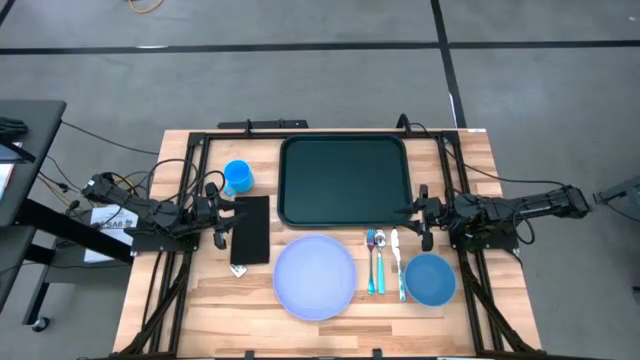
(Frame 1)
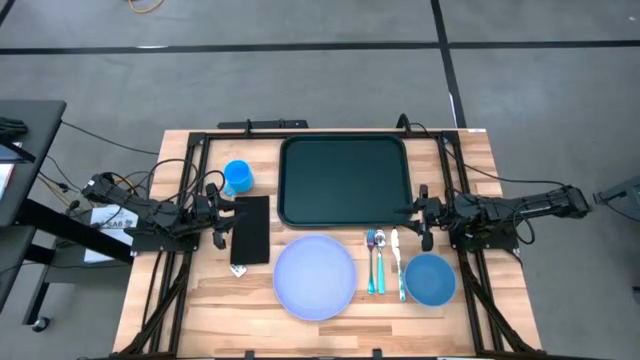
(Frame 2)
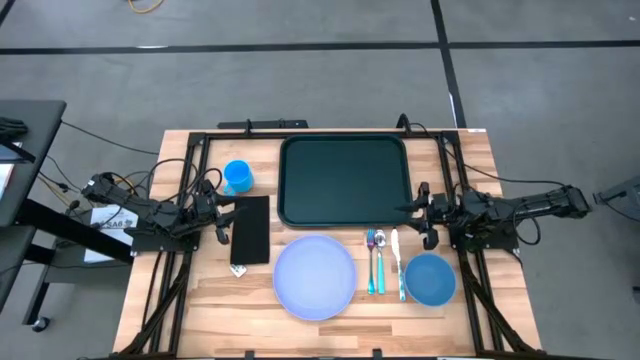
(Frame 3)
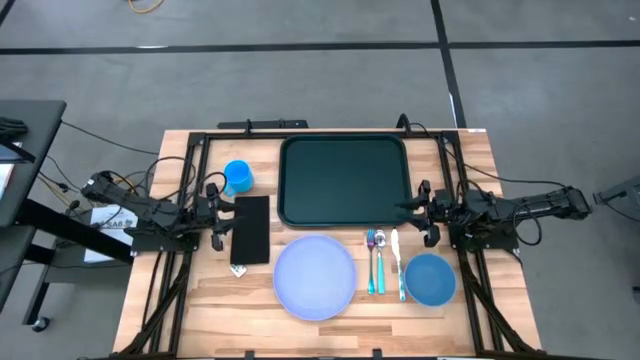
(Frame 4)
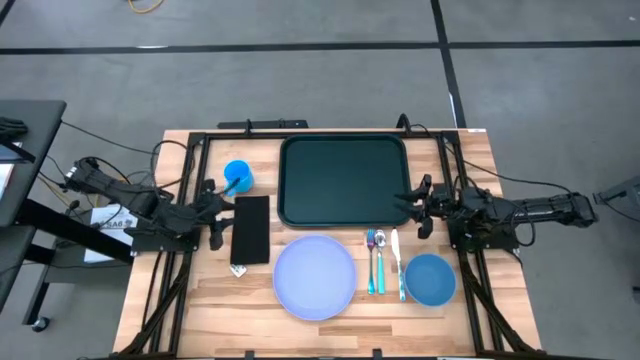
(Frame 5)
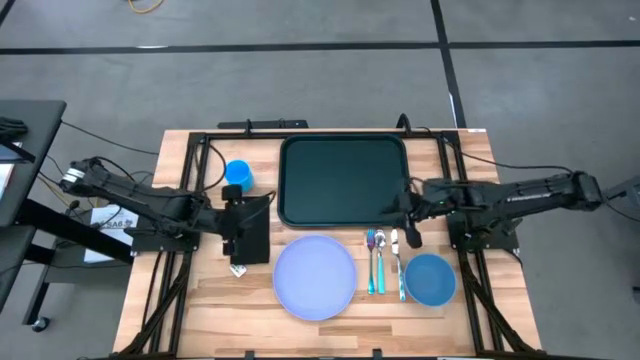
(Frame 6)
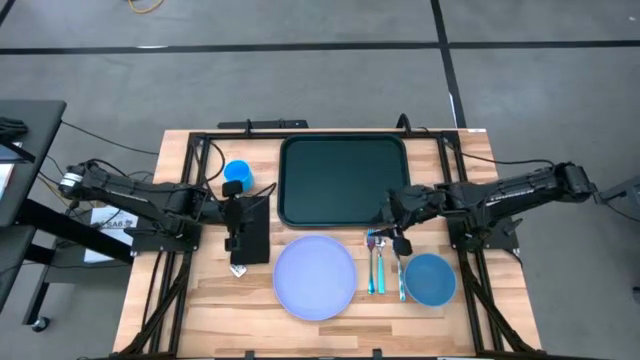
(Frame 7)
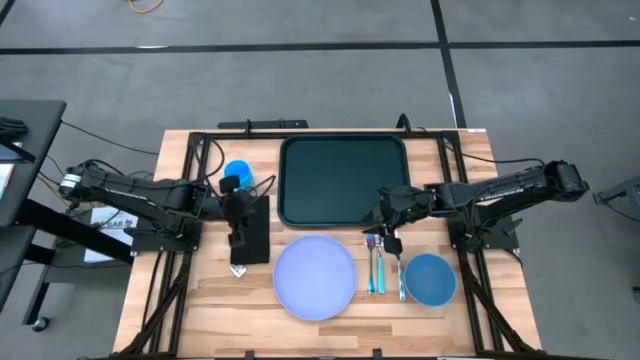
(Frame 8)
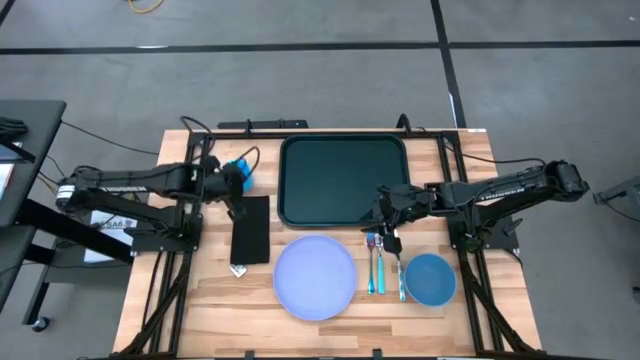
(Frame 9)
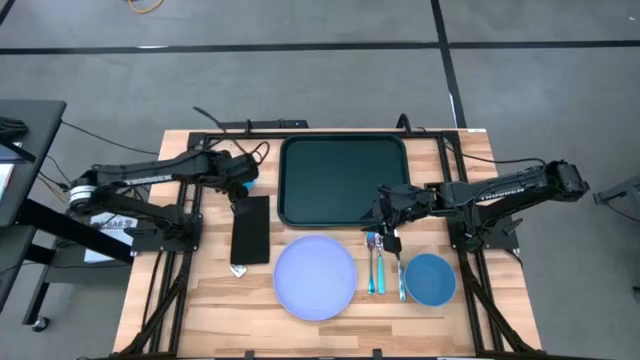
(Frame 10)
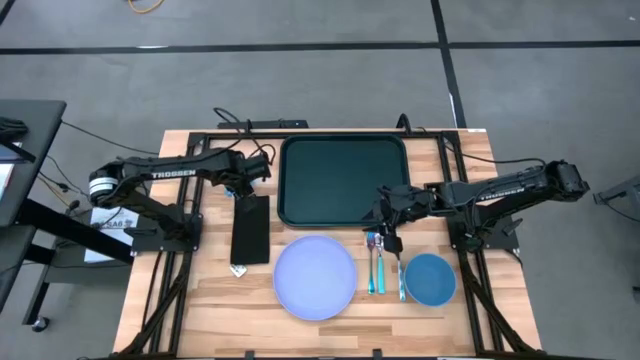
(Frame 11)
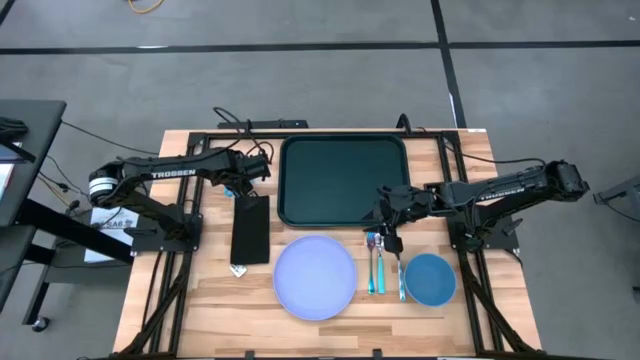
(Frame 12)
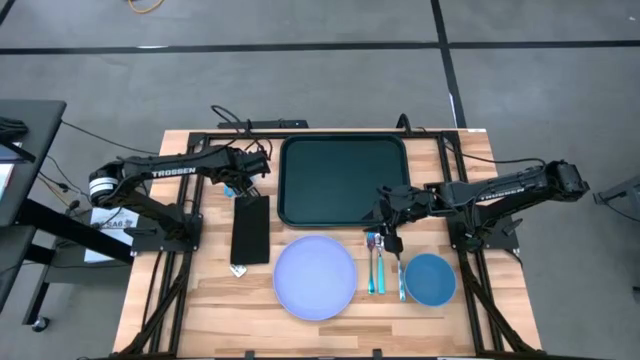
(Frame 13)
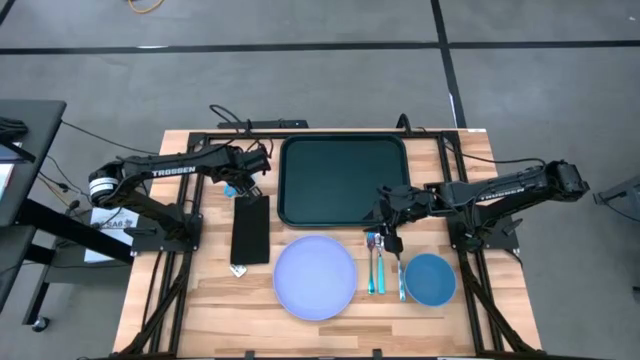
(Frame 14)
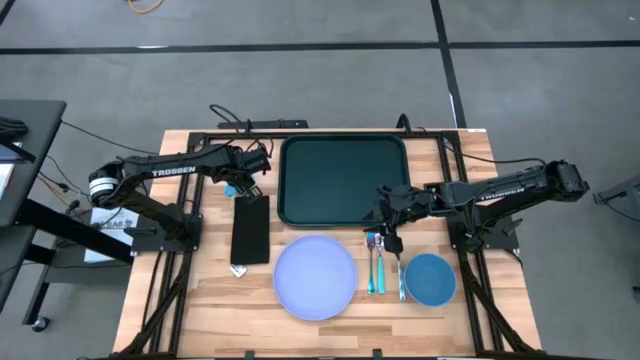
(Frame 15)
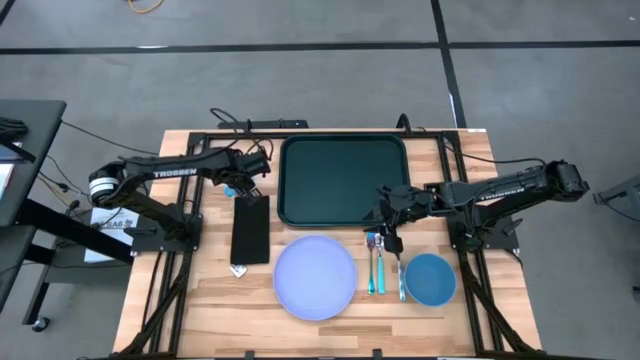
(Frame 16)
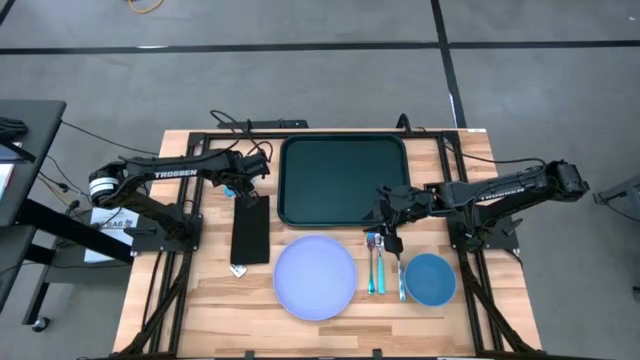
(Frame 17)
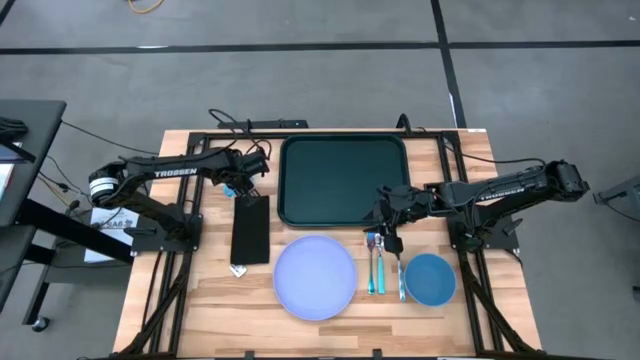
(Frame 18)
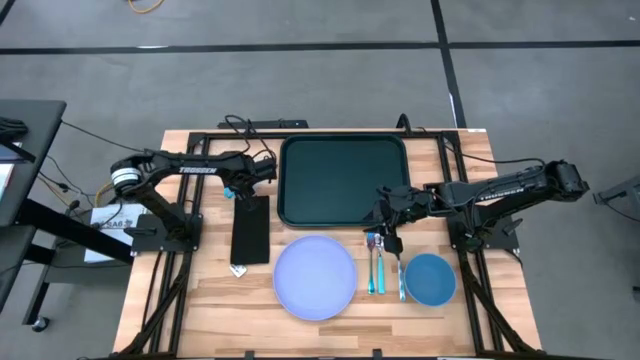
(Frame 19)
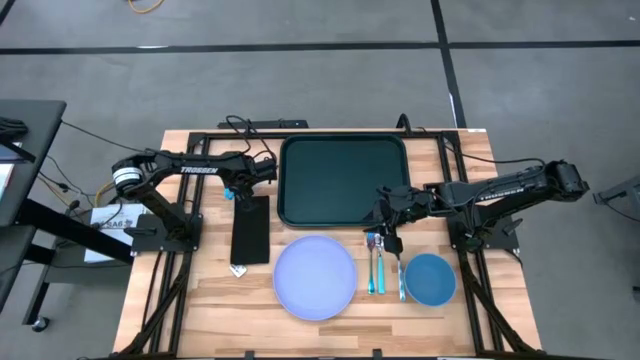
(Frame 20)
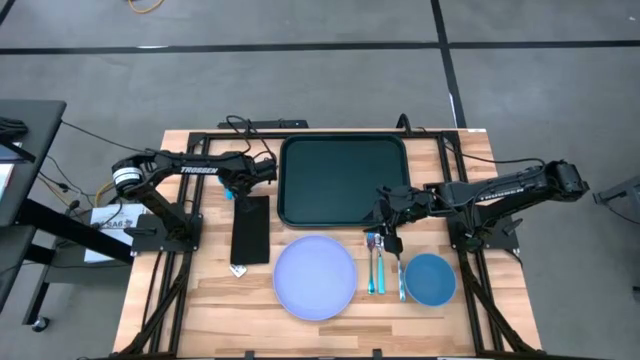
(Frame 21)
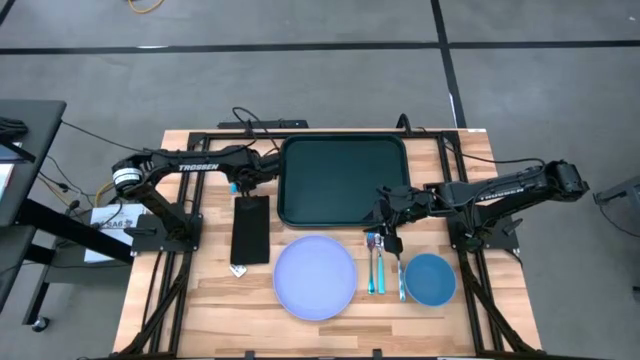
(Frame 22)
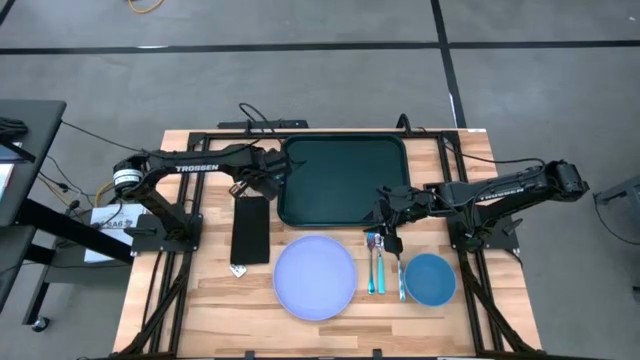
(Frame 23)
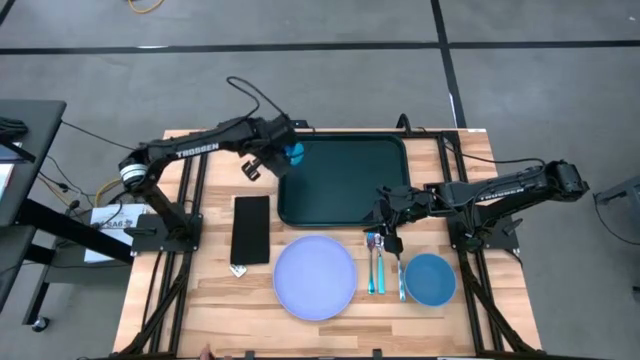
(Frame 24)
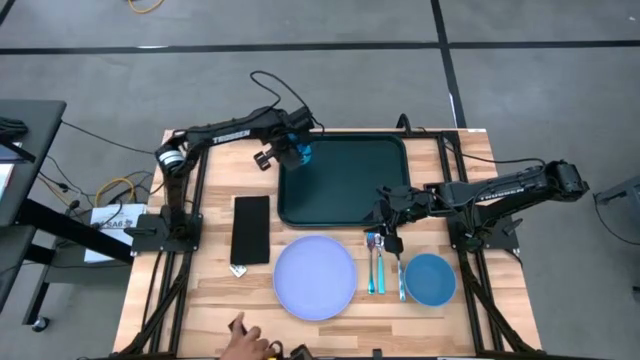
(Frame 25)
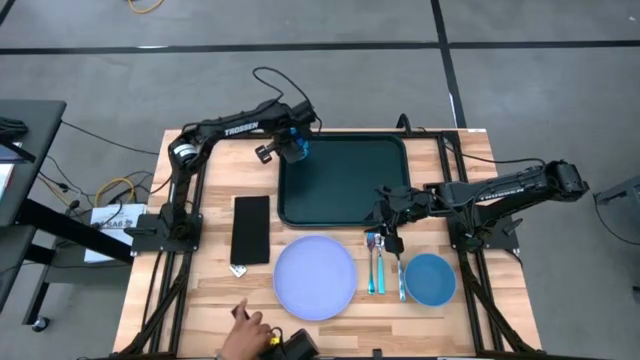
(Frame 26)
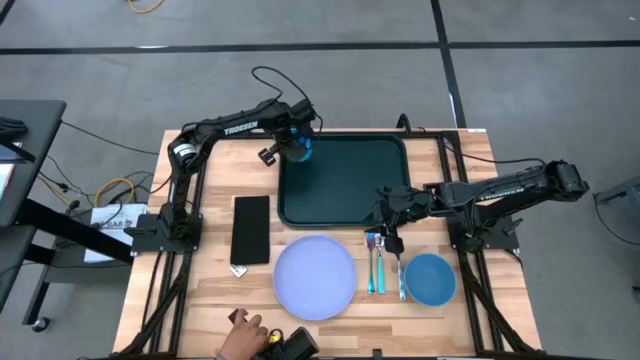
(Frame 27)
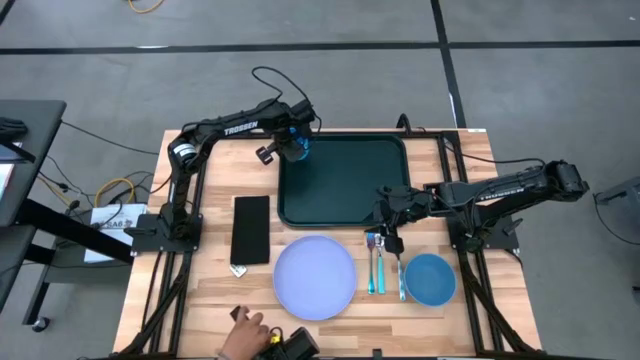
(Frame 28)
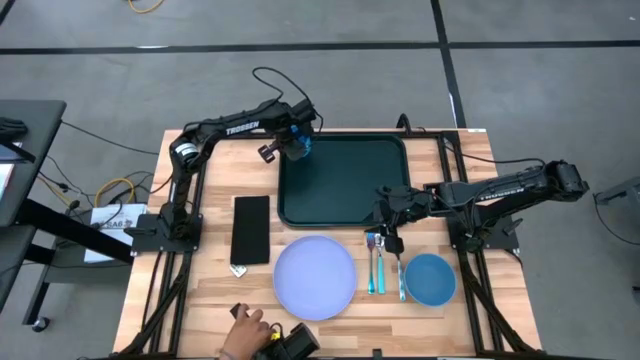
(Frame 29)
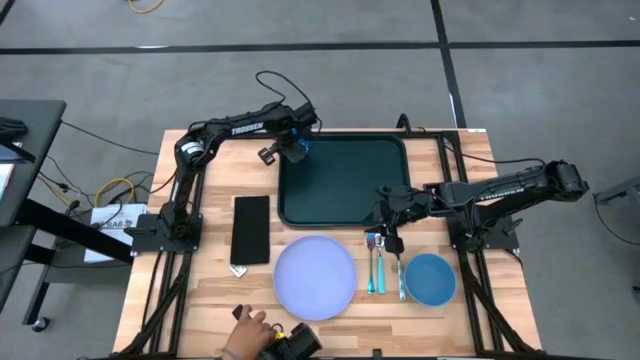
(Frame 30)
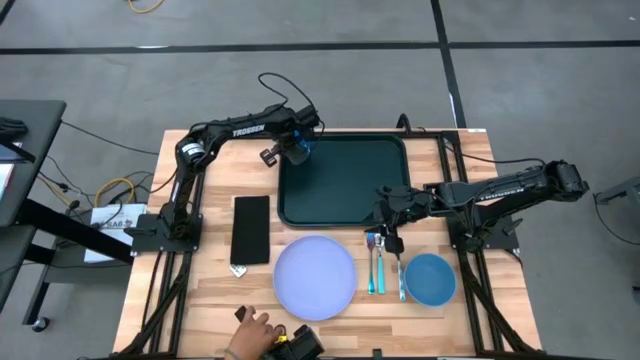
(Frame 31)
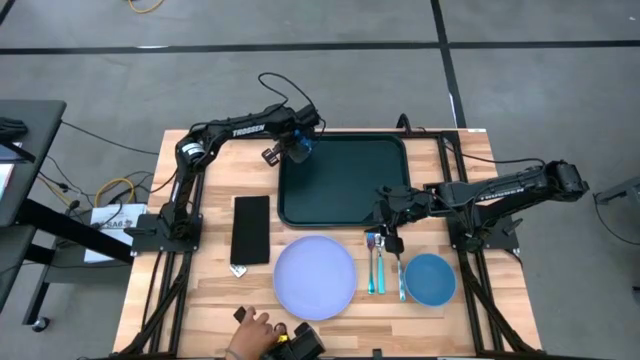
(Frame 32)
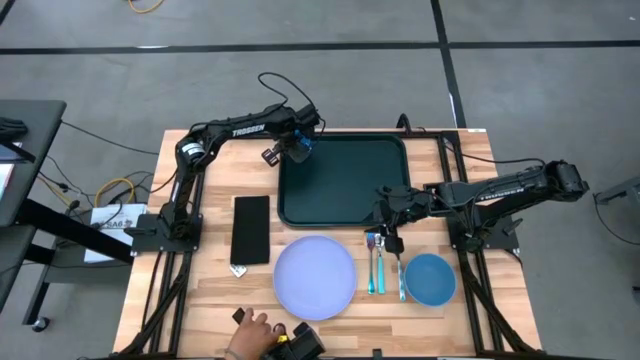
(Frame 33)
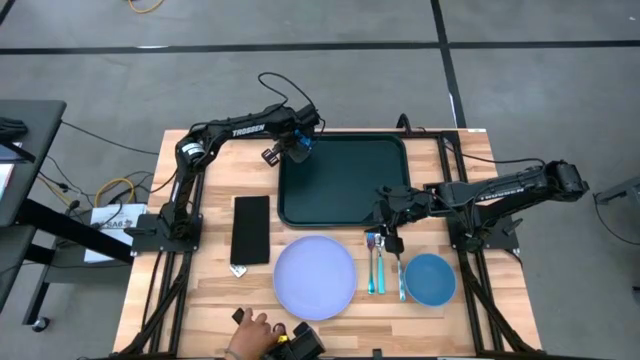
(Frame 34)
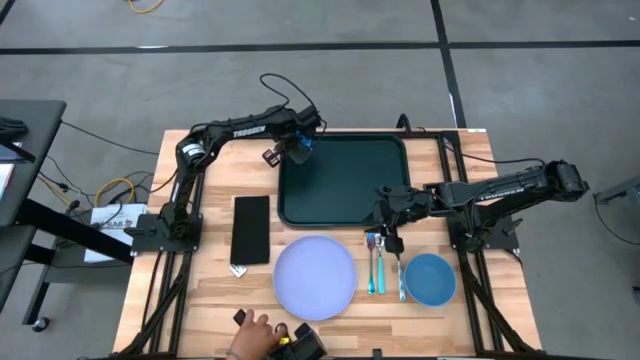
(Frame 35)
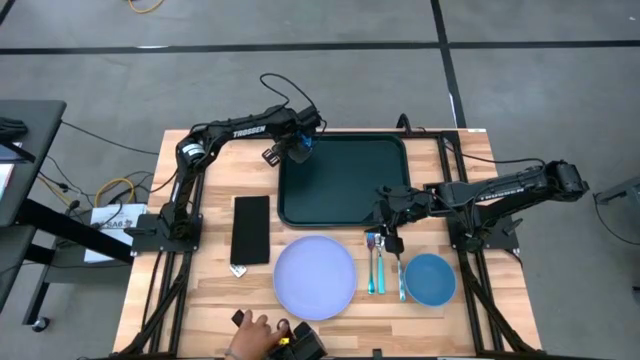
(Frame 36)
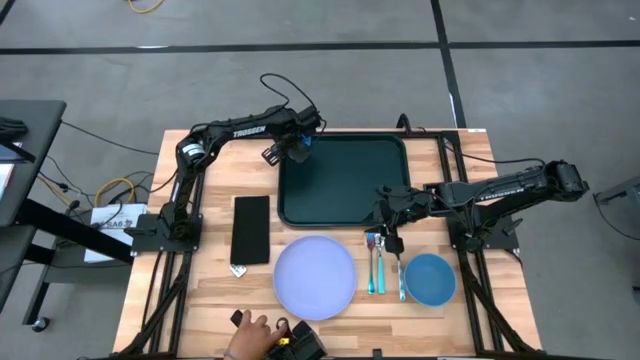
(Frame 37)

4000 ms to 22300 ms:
Task: Set up tray
Put the light blue cup on the black tray

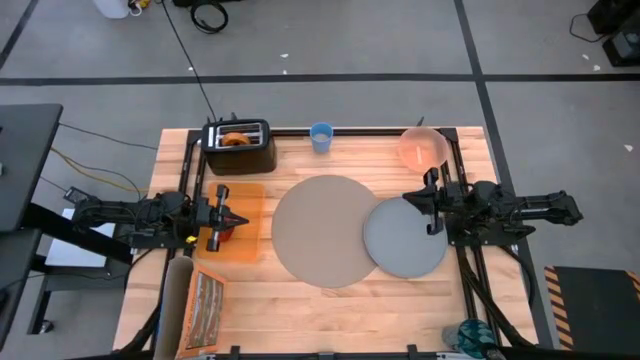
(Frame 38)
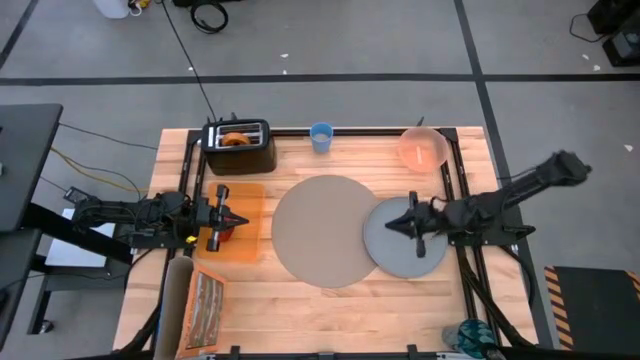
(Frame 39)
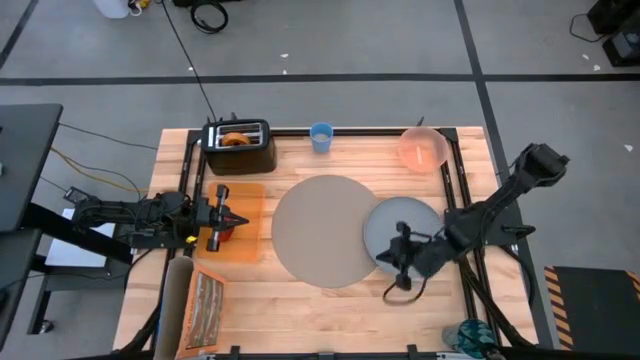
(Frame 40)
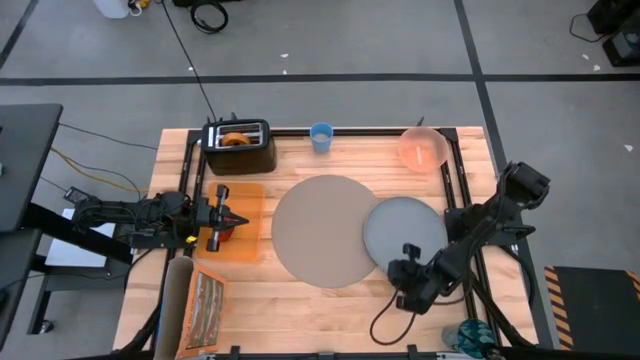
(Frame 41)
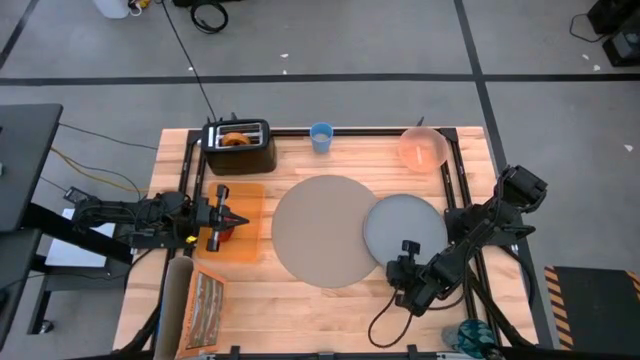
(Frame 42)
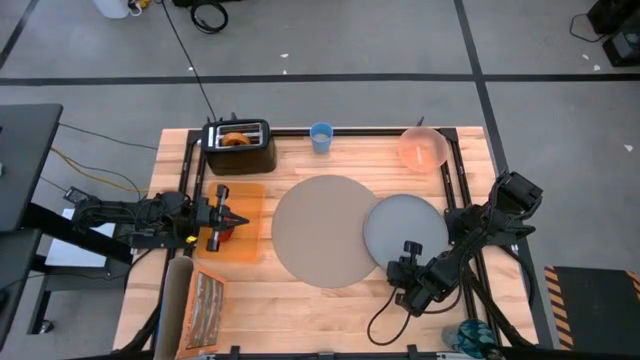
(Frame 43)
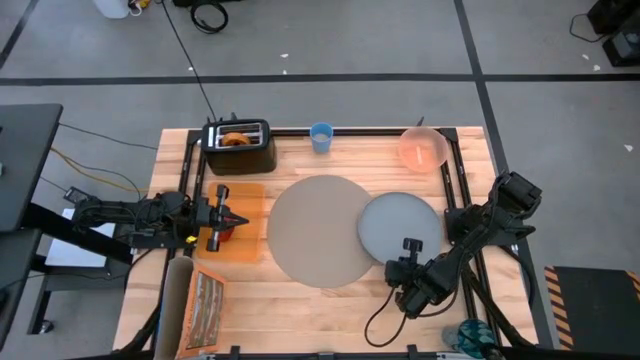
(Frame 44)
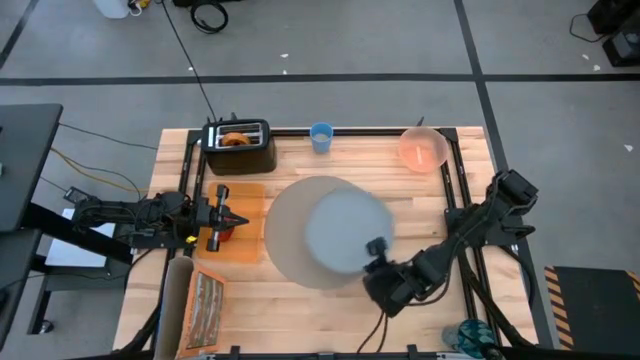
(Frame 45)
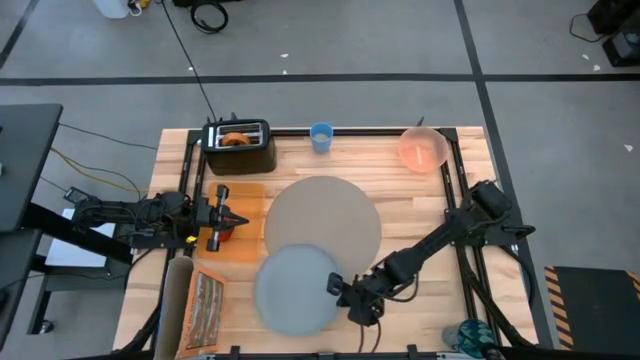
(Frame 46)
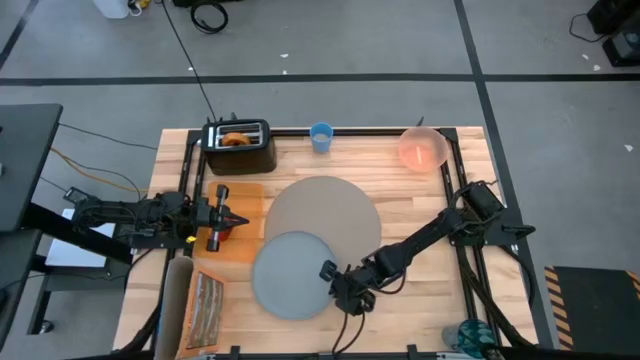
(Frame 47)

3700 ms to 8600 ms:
Task: Arrange a breakfast setting
Put the blue plate on the table mat
